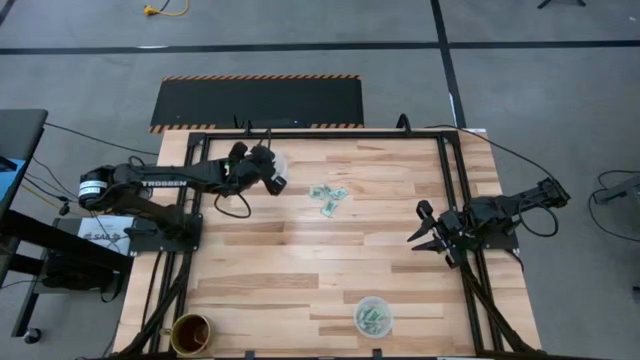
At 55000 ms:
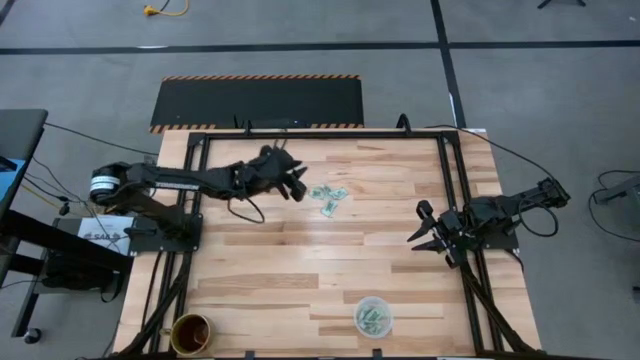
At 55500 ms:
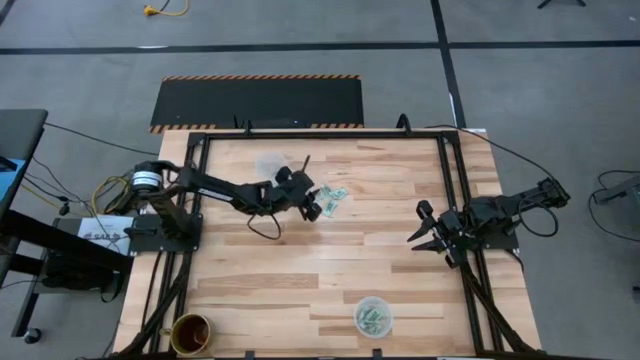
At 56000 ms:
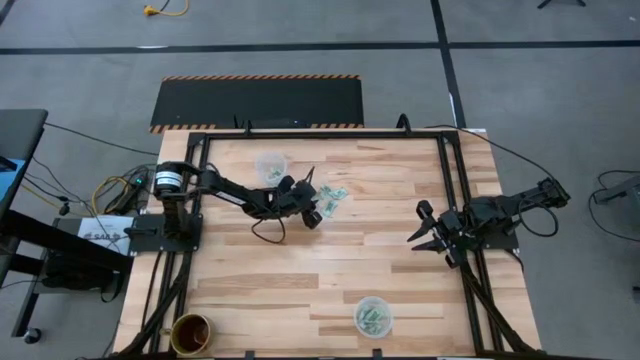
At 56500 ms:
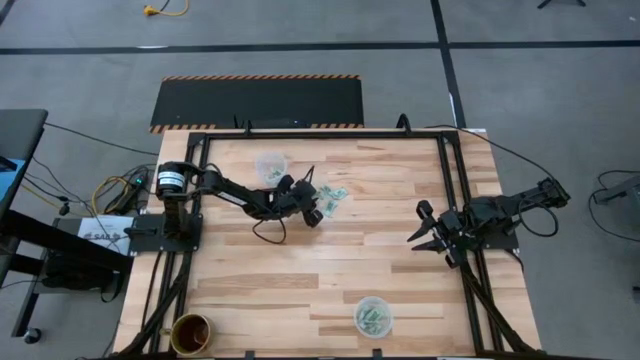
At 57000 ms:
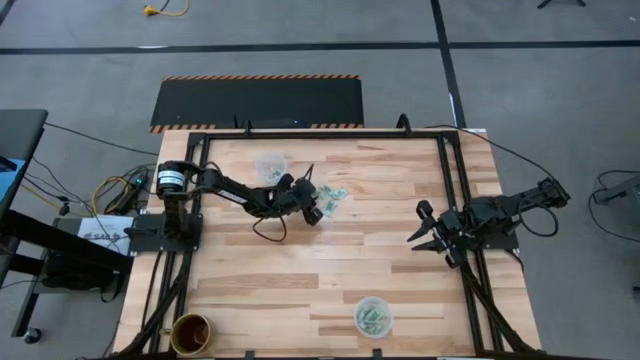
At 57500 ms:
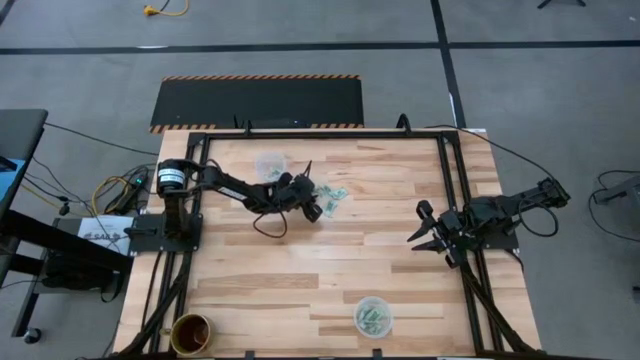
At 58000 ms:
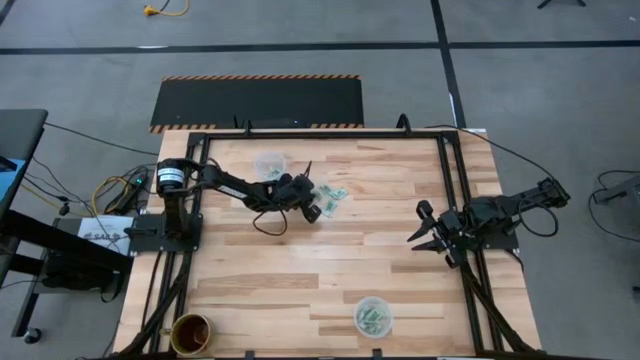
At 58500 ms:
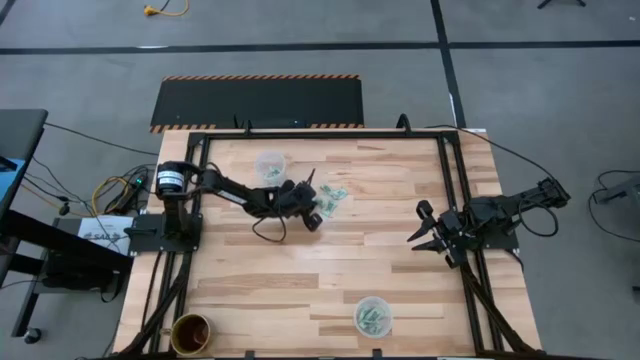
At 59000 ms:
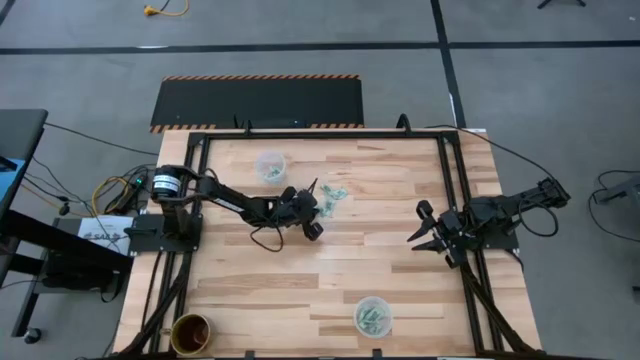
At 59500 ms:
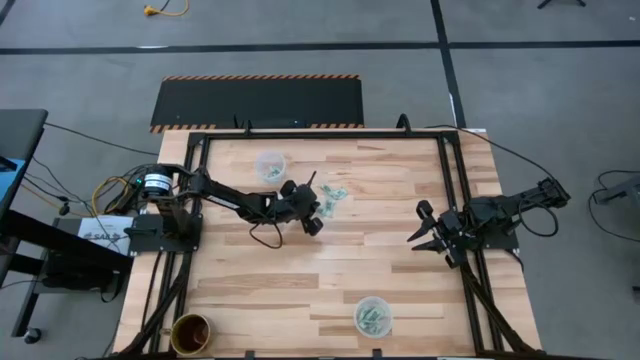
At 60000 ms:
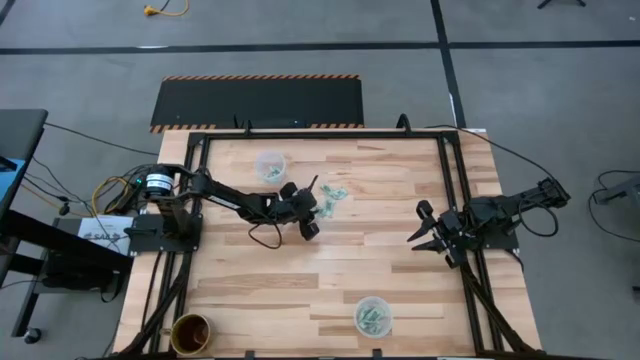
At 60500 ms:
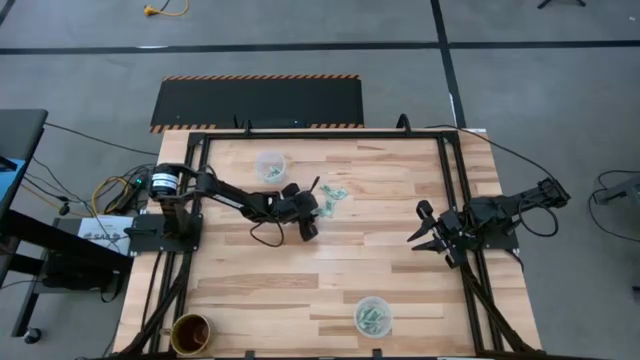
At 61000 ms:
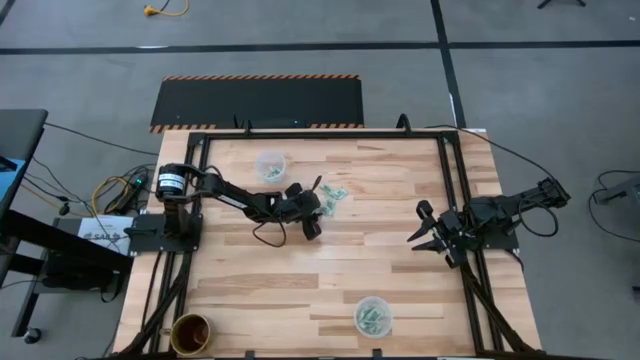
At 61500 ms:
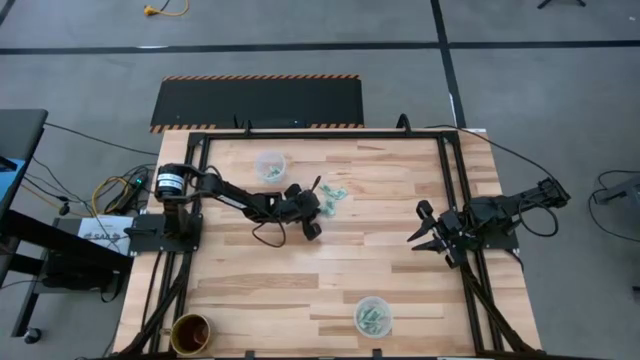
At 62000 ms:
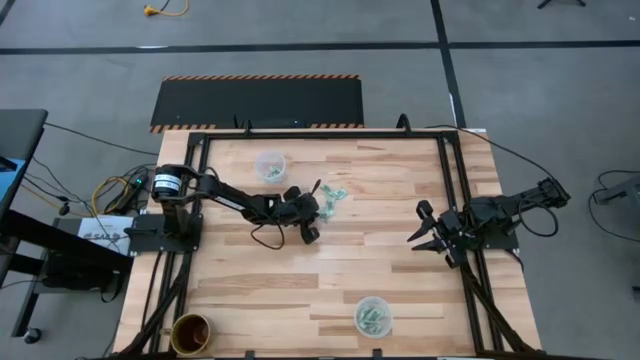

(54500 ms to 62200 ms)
Task: Pick and place Stevia / Truvia into bins
Put the white stevia packet into the top transparent container

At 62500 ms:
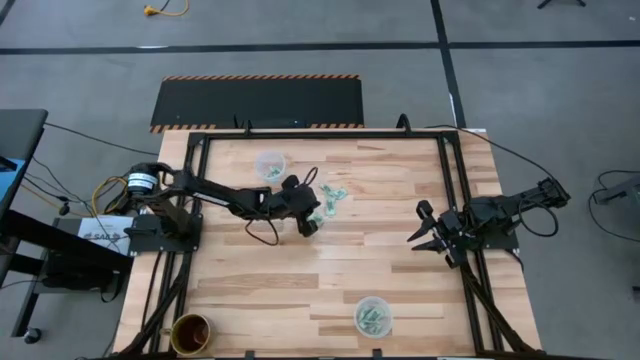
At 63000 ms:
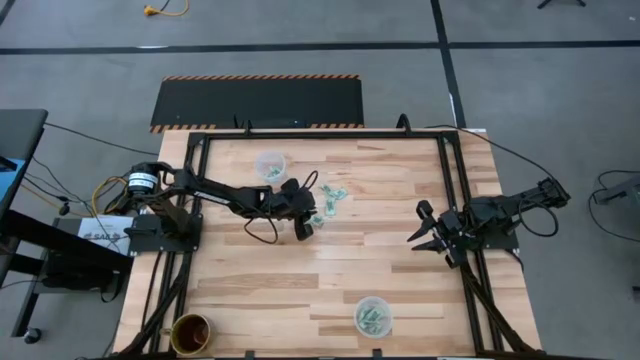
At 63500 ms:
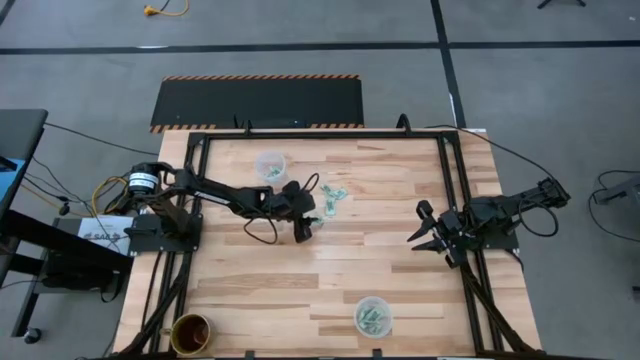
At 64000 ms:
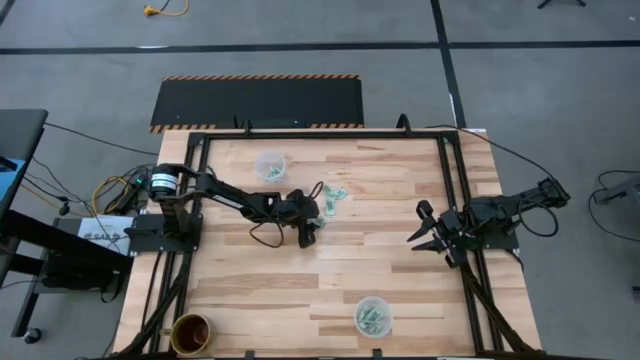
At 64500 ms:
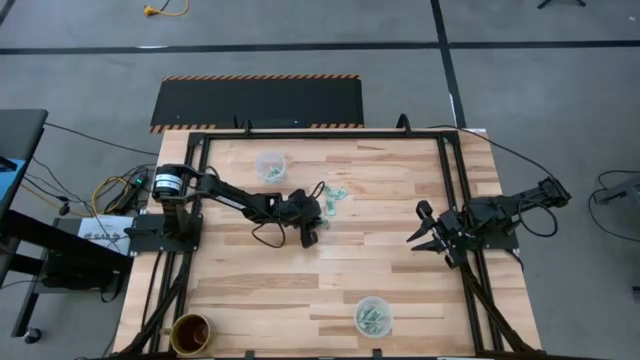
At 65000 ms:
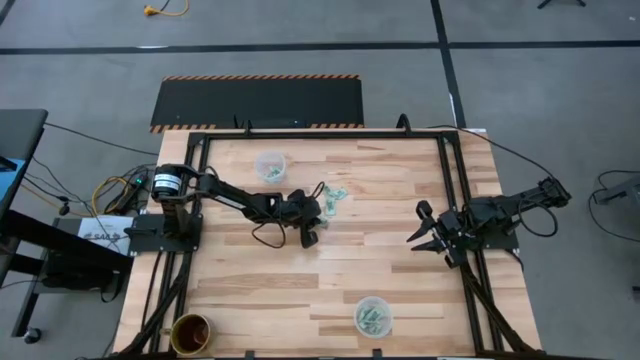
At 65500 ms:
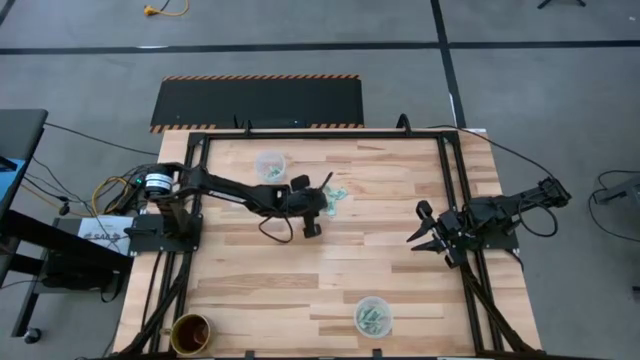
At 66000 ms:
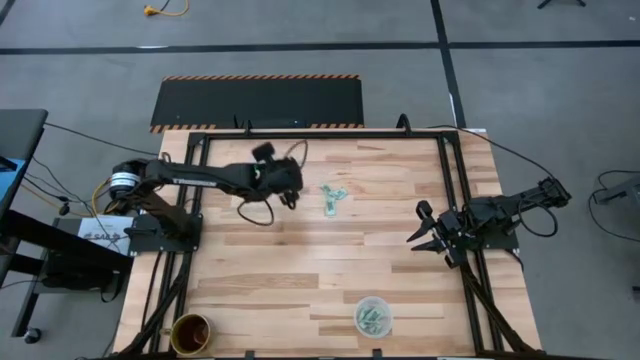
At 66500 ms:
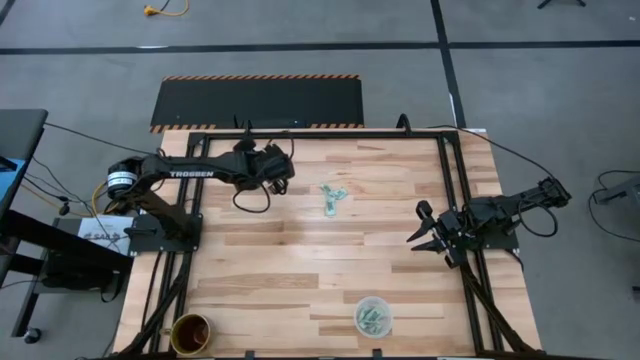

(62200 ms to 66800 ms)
Put the white stevia packet into the top transparent container

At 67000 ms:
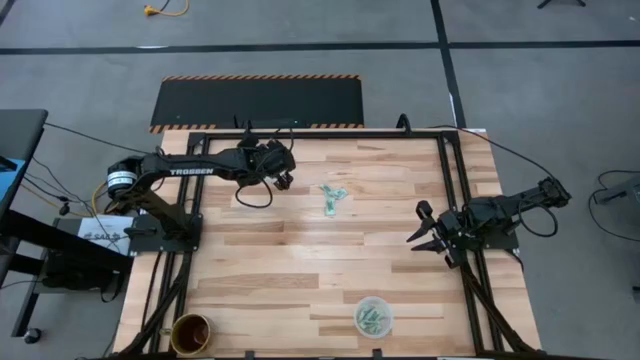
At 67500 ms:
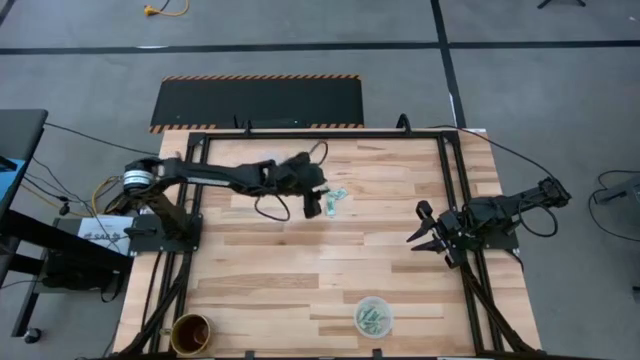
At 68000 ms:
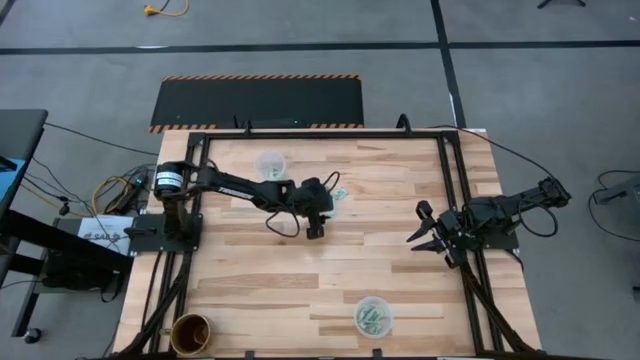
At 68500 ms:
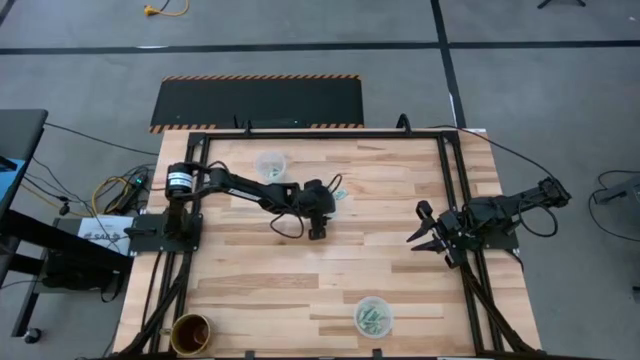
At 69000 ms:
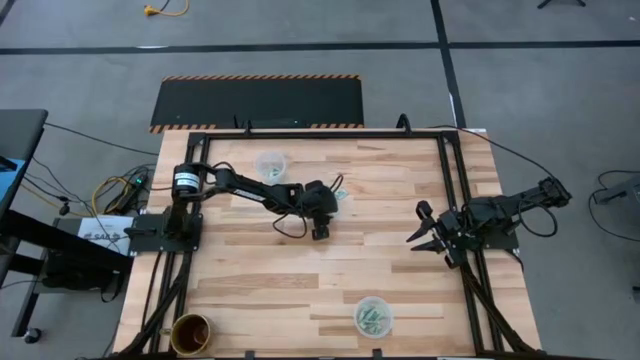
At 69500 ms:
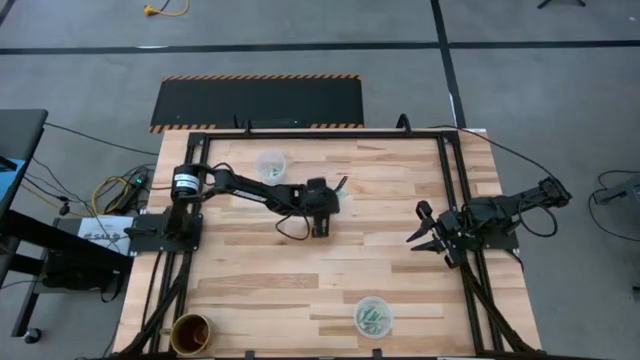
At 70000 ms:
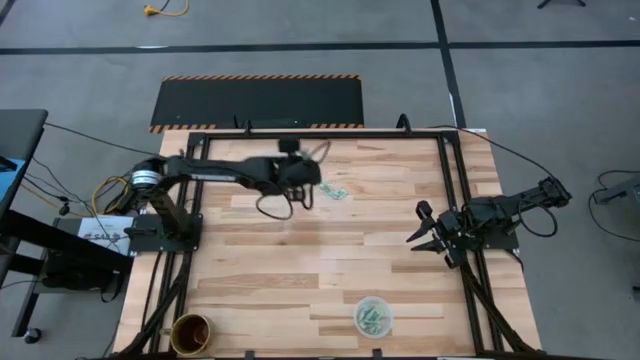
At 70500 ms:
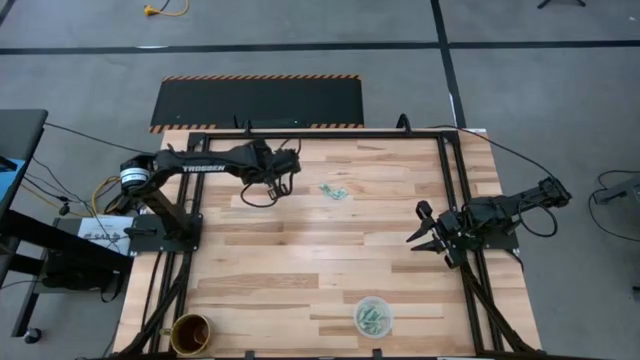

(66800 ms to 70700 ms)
Put the white stevia packet into the top transparent container

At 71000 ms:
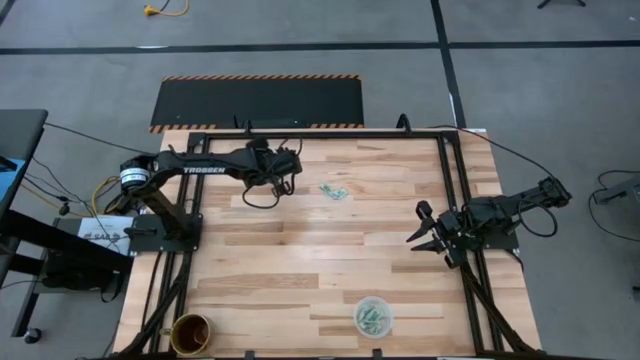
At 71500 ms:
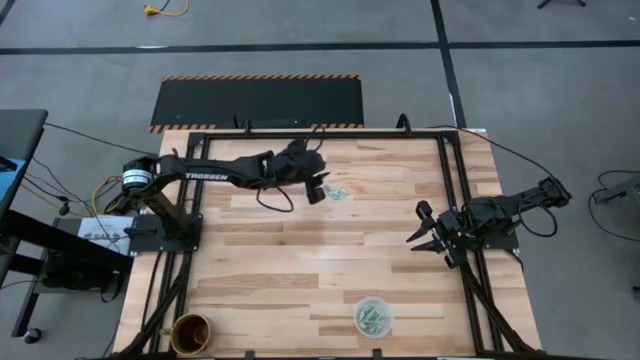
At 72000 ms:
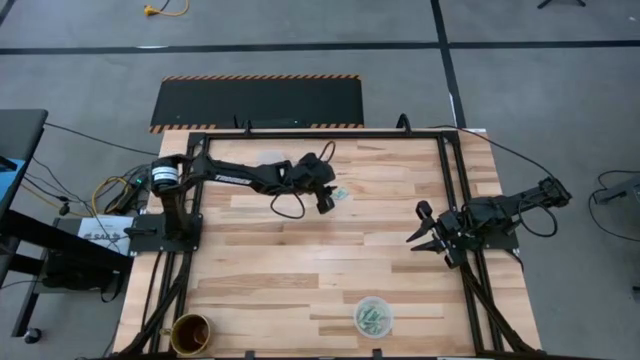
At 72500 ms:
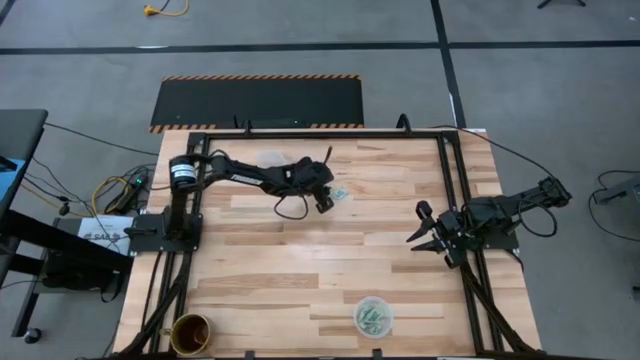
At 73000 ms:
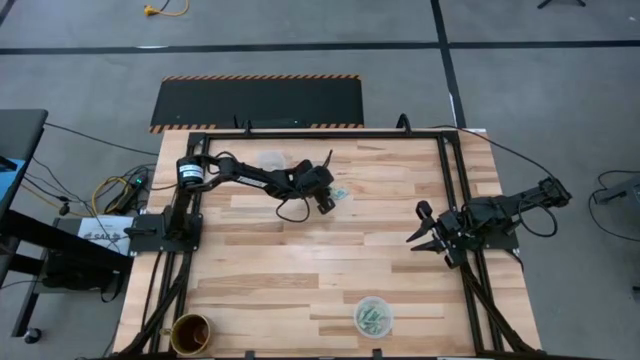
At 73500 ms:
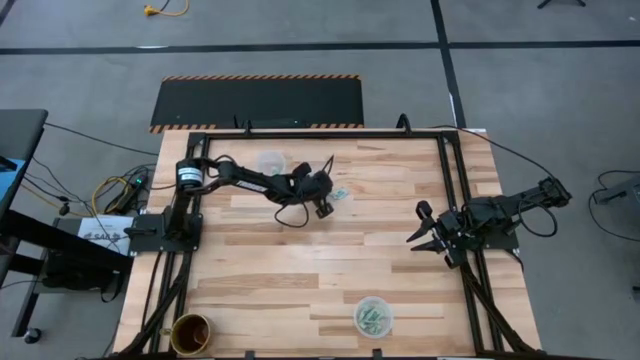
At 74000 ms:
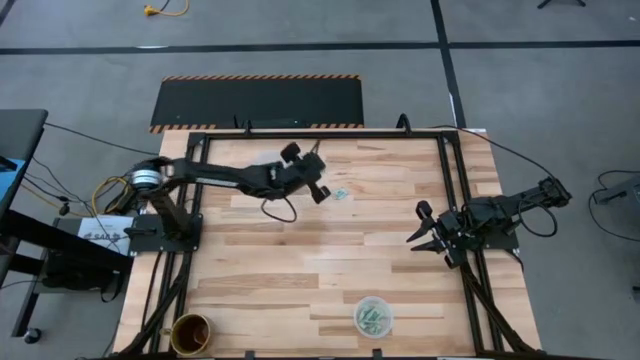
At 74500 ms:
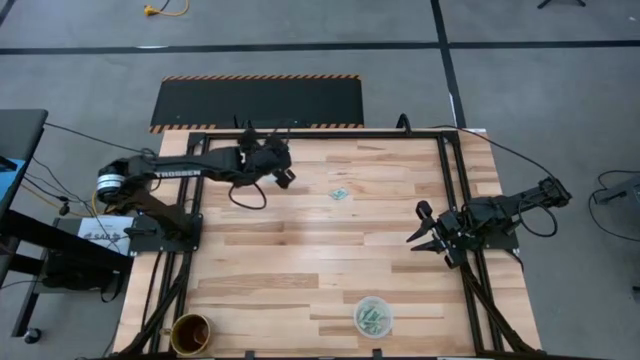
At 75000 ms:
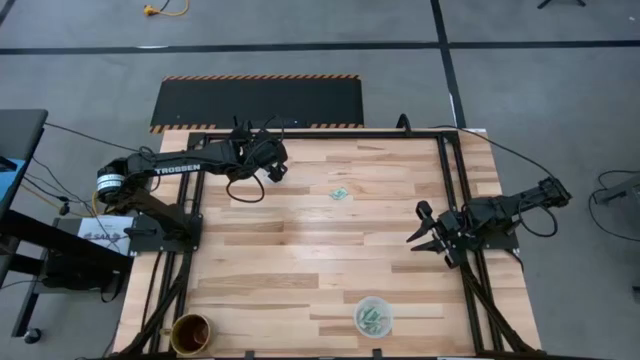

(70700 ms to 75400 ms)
Put the white stevia packet into the top transparent container
